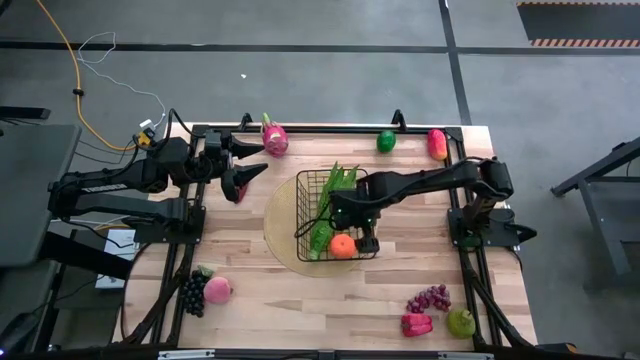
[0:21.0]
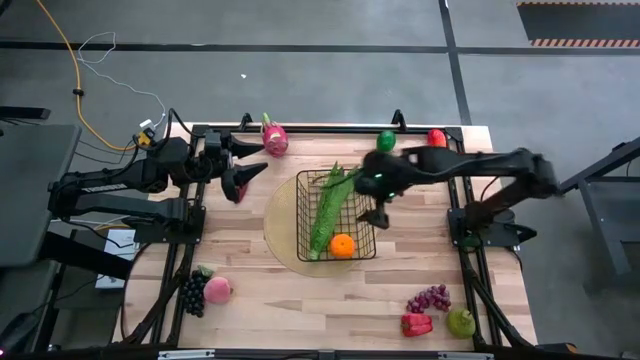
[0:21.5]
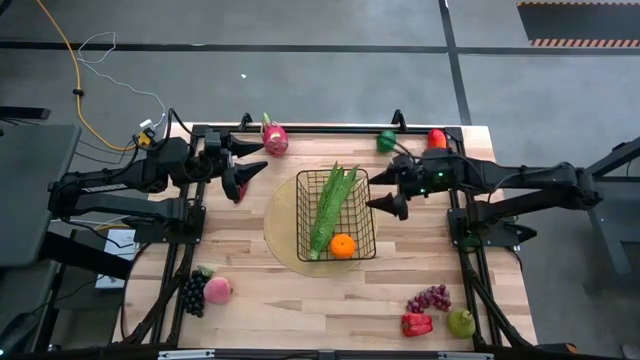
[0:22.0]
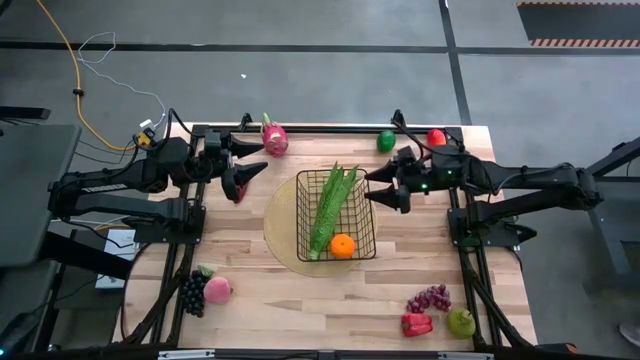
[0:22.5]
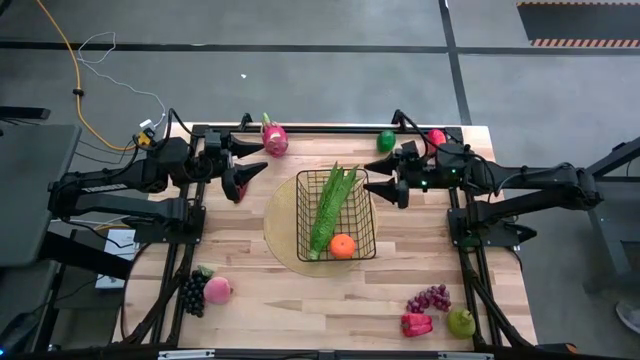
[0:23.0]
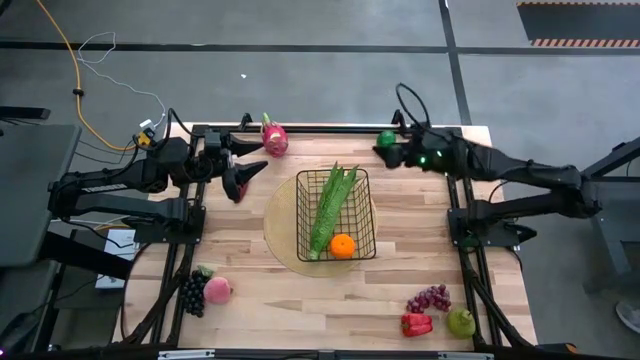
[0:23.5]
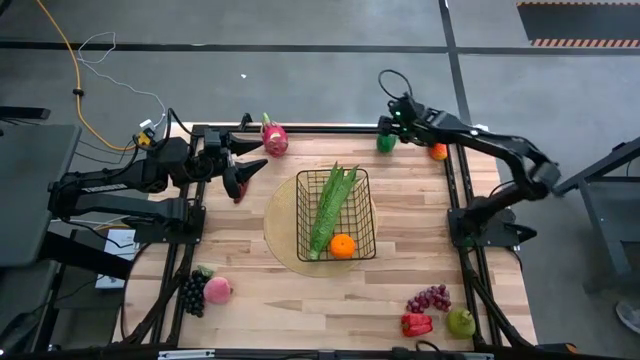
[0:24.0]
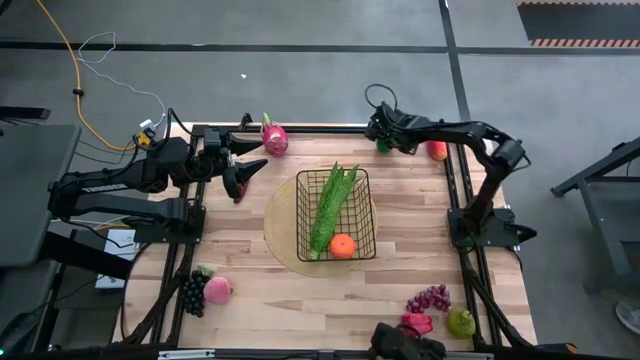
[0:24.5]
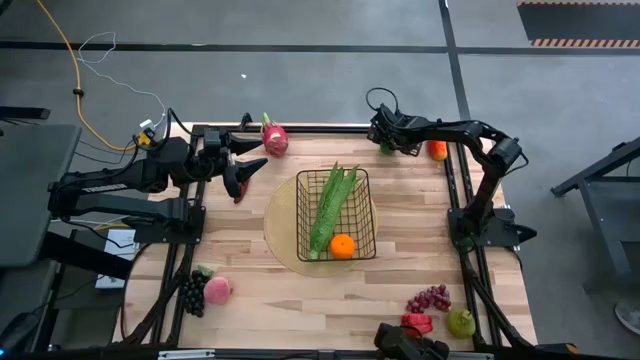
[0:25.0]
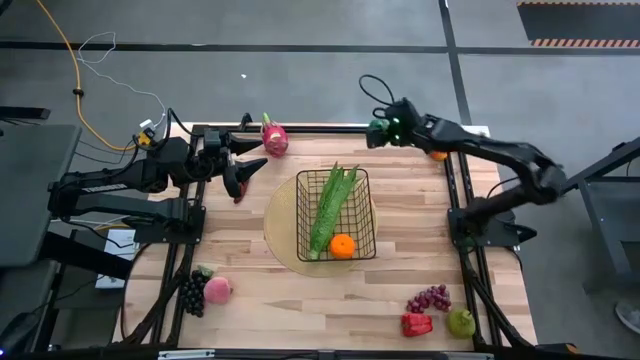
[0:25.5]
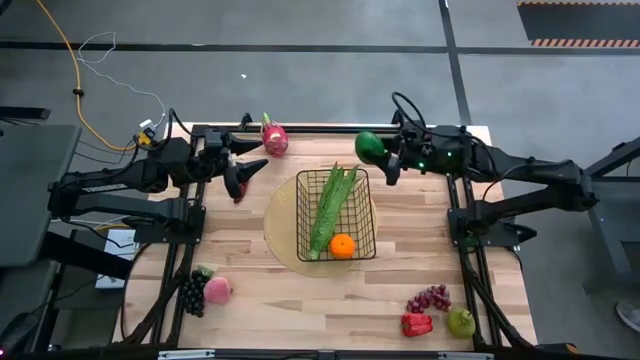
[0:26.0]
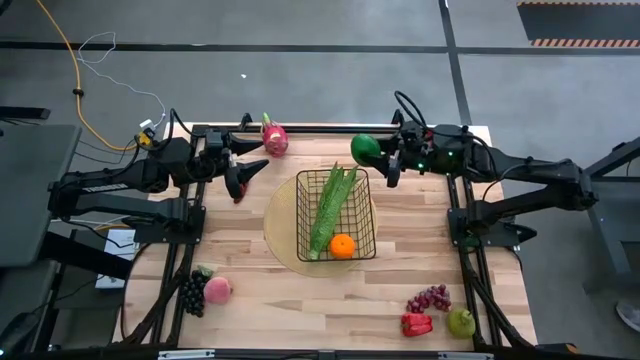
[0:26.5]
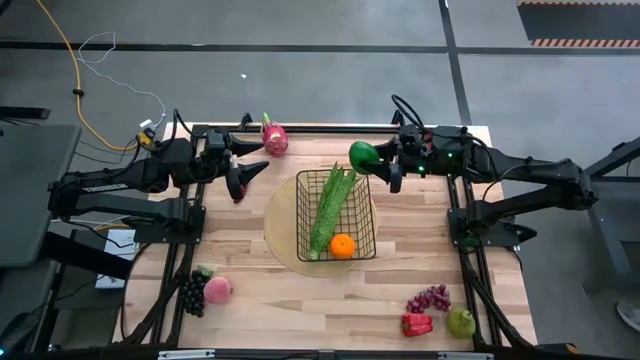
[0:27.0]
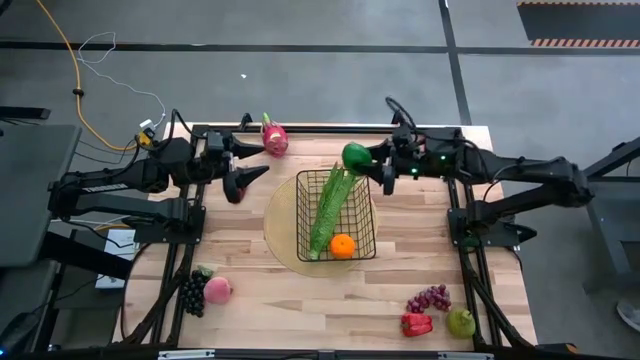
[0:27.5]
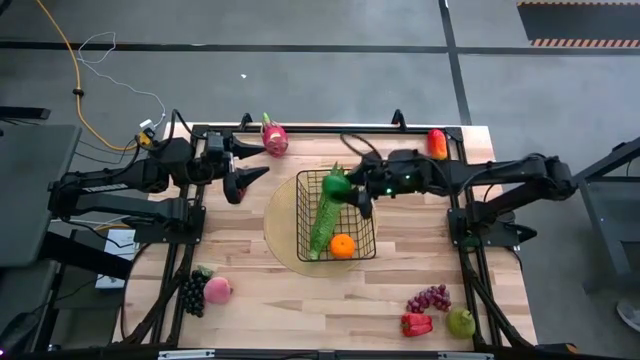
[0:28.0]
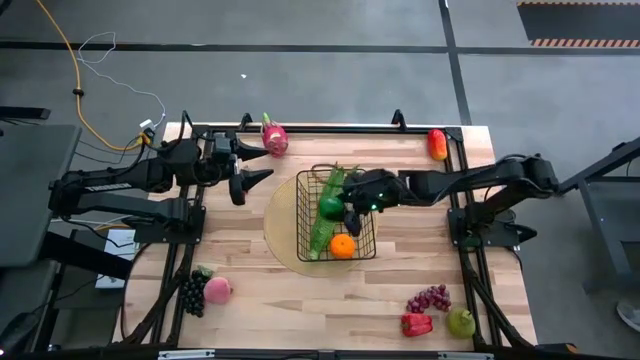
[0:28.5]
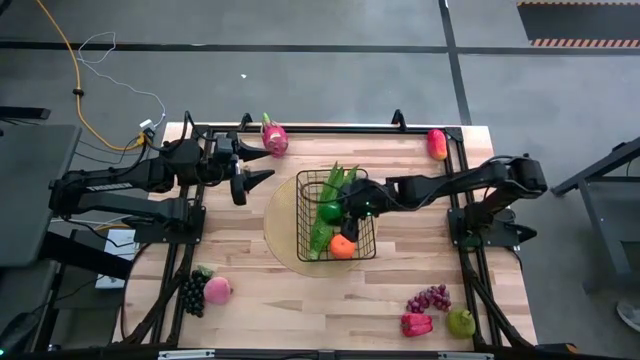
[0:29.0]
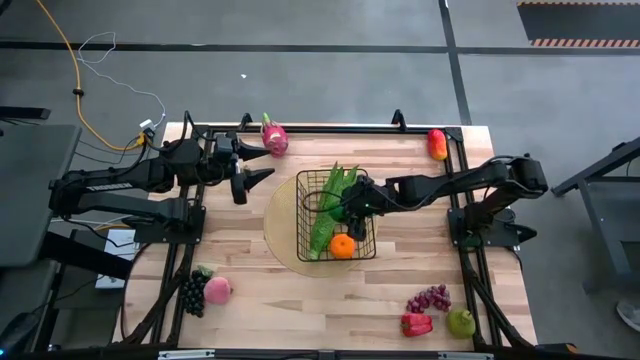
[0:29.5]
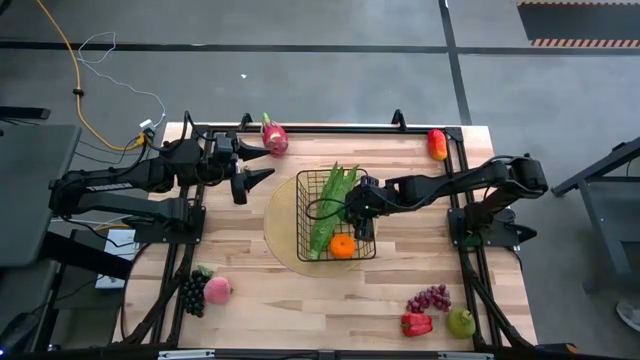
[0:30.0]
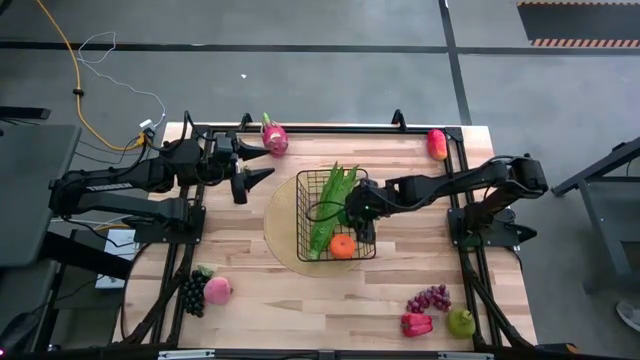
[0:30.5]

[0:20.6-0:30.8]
Task: Build produce basket
Put the lime into the wire basket

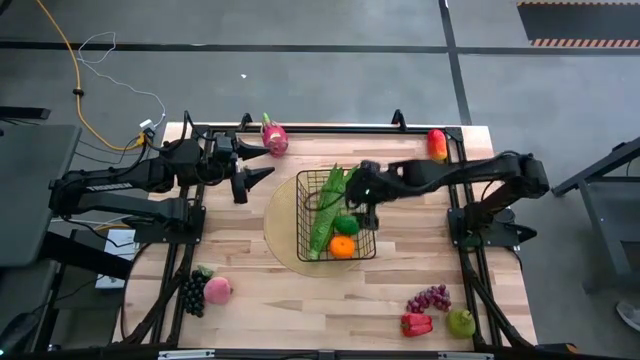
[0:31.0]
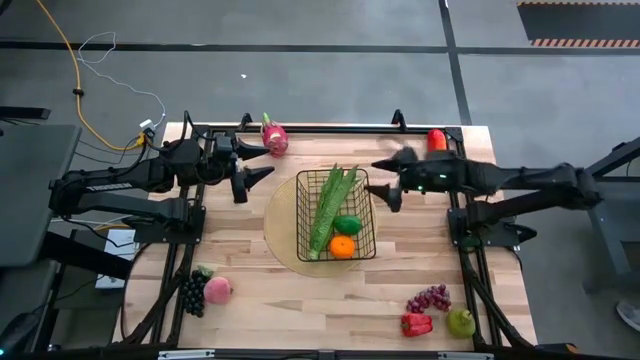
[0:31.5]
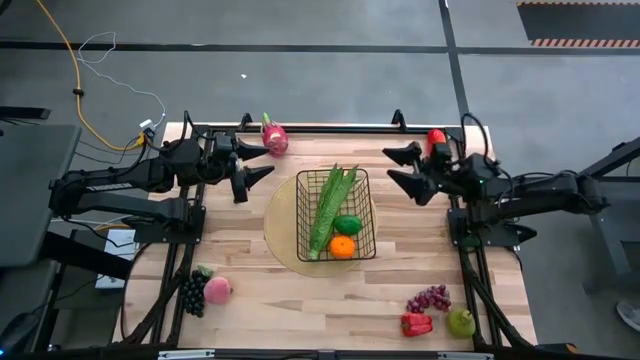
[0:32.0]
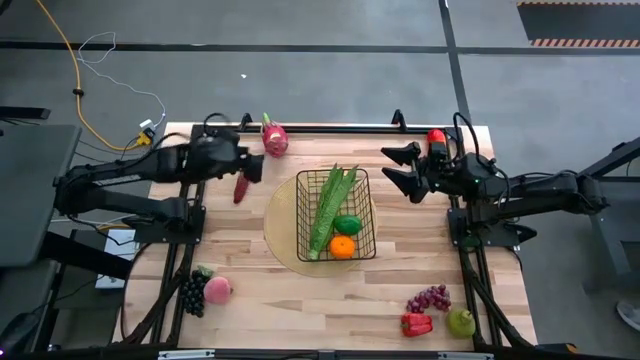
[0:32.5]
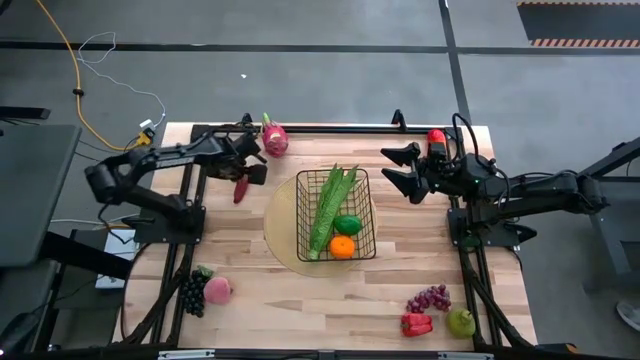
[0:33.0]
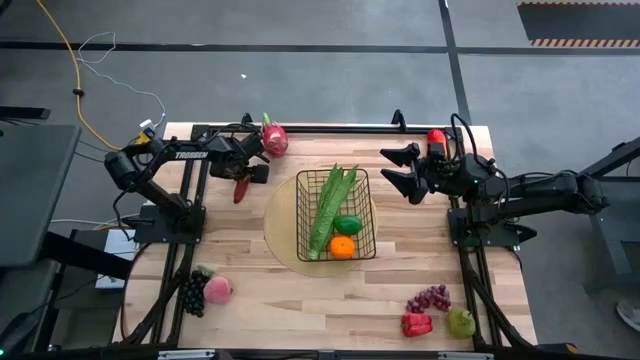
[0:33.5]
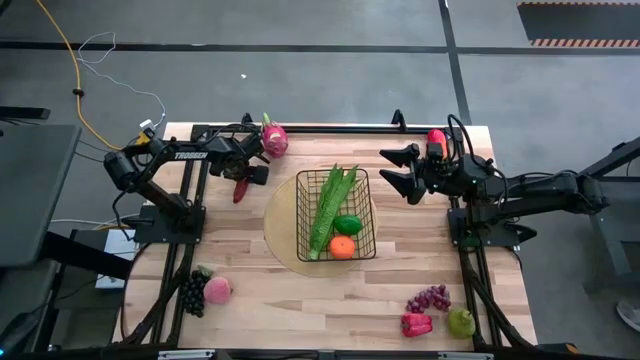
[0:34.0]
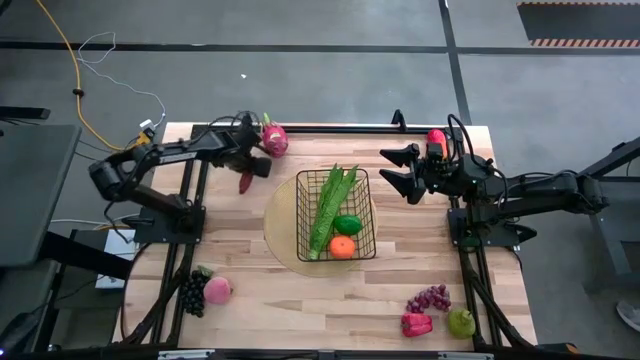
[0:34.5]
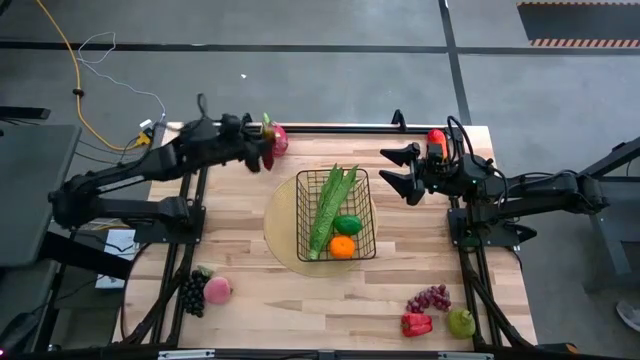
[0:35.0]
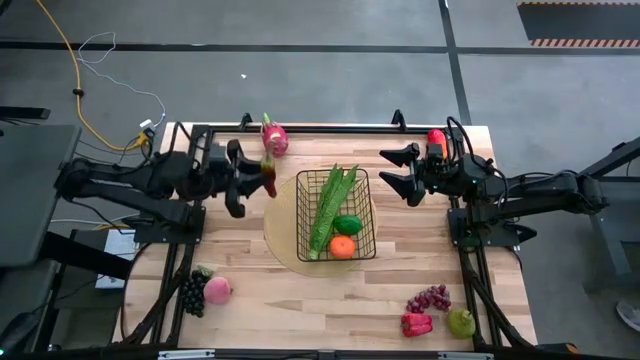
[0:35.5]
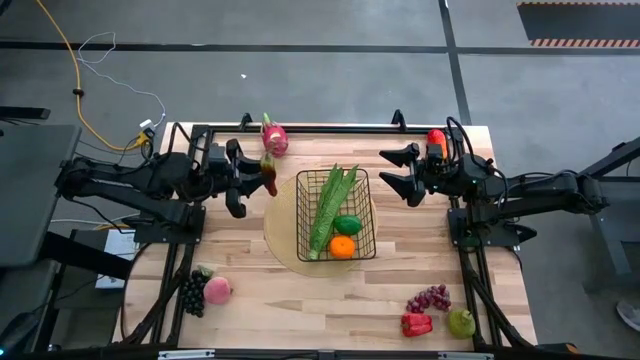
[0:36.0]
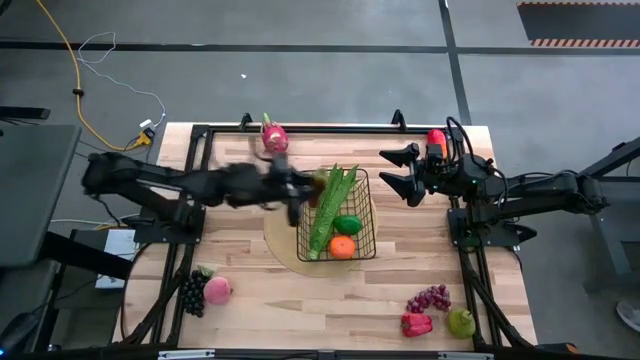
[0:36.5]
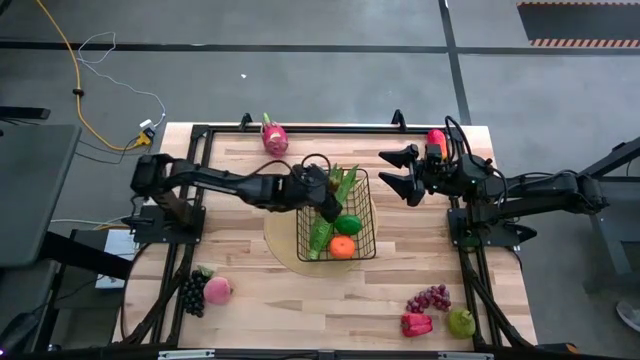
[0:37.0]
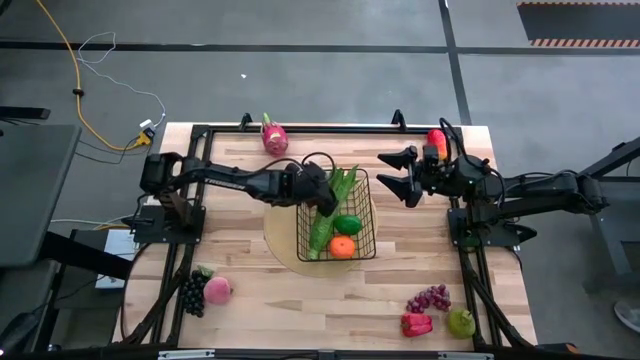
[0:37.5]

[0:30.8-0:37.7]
Put the red chili pepper into the wire basket

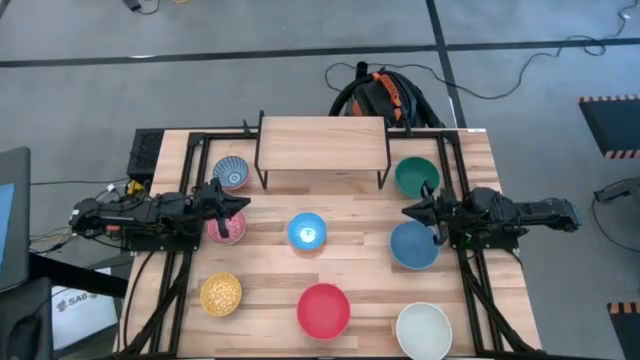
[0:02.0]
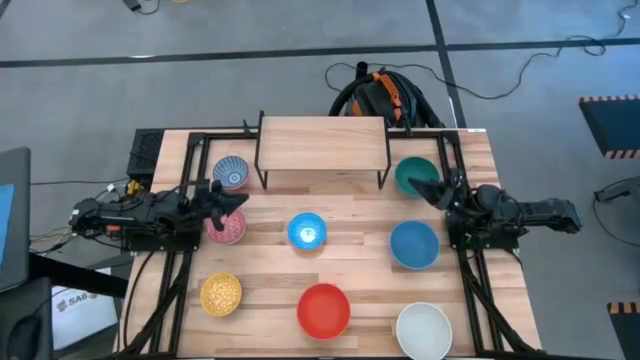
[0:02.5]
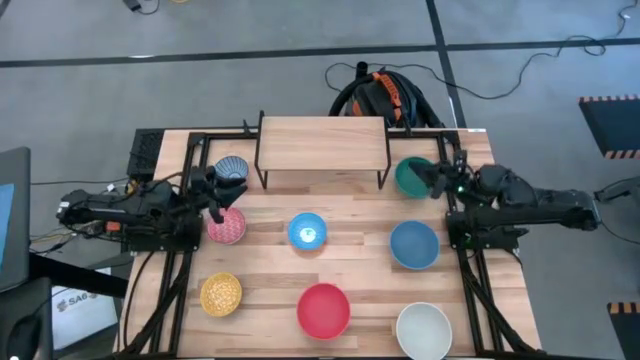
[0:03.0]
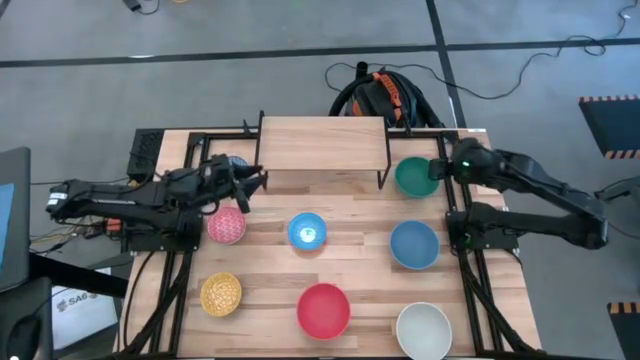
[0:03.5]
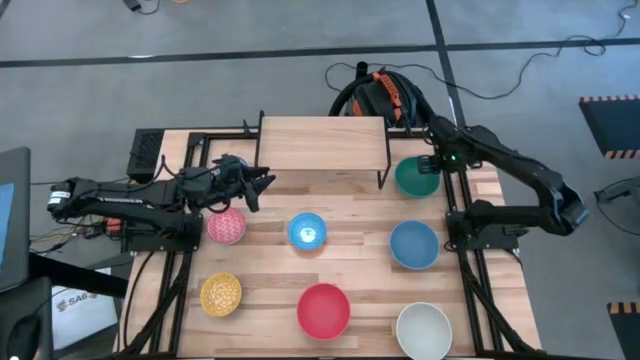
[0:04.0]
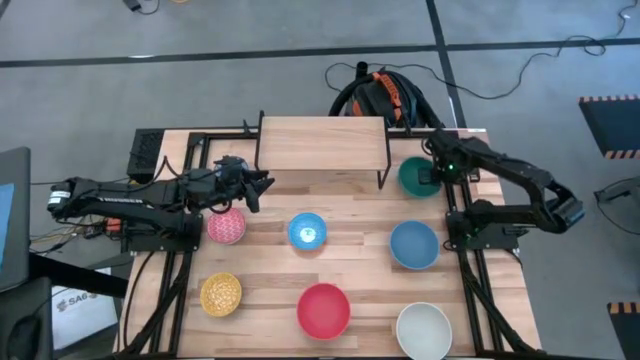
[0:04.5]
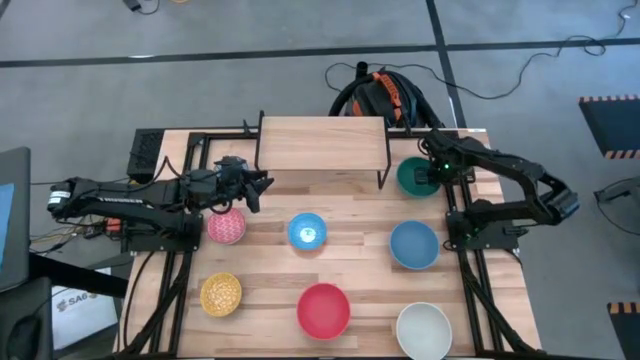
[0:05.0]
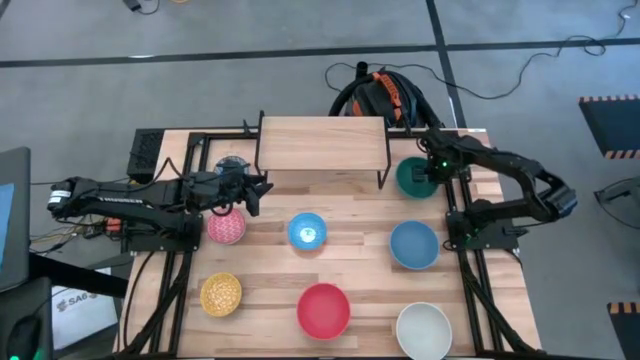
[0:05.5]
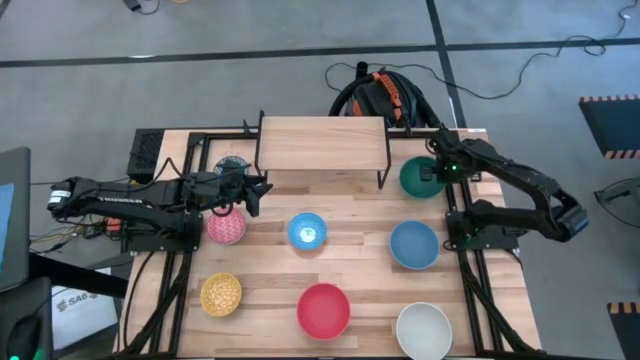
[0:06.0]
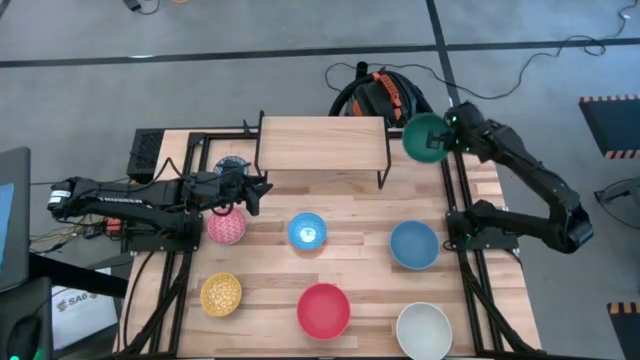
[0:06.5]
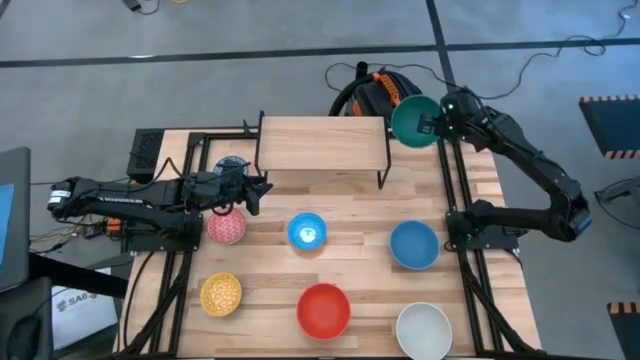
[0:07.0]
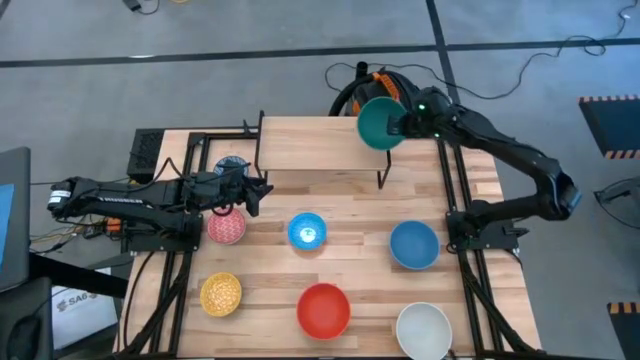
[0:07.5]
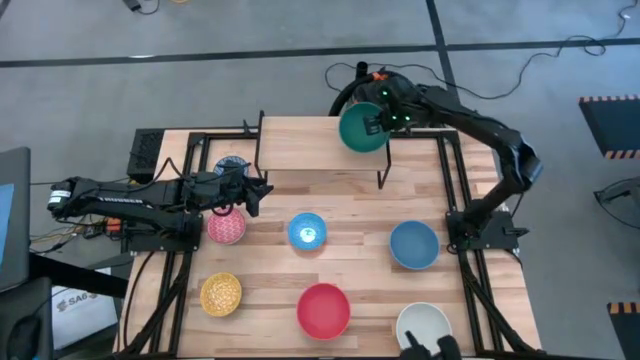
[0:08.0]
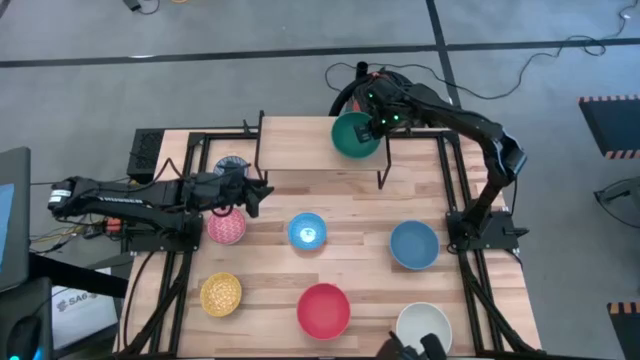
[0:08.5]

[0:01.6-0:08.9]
Task: Place and stack bowls onto a shelf
Put the green bowl on the shelf
